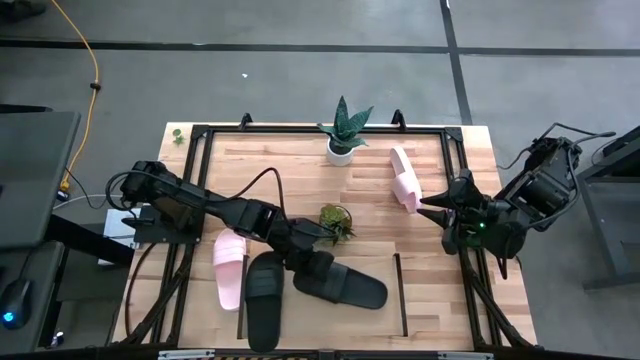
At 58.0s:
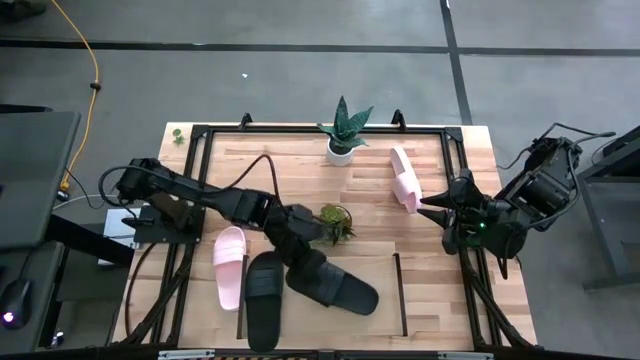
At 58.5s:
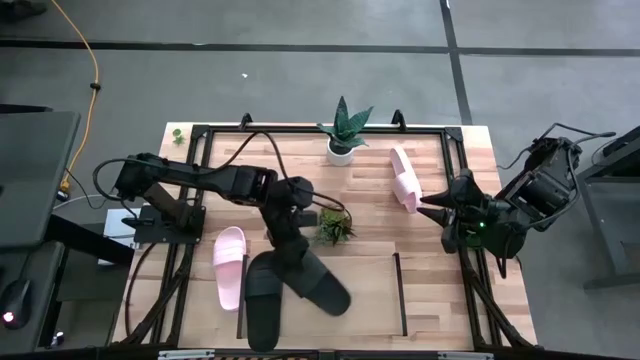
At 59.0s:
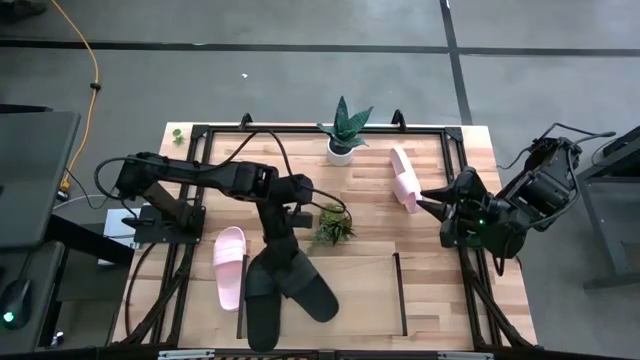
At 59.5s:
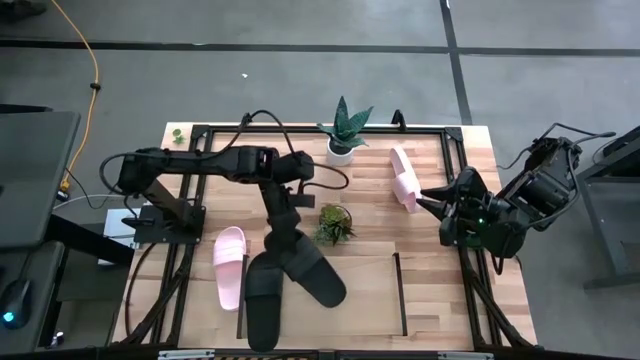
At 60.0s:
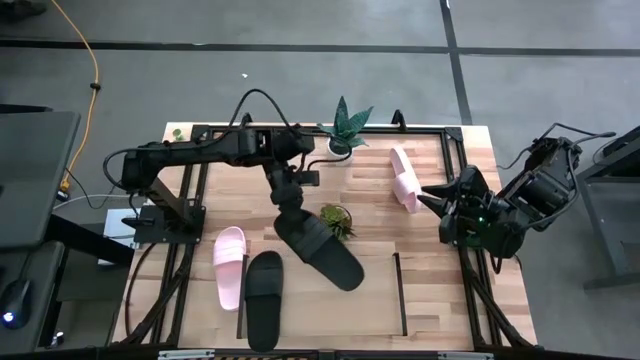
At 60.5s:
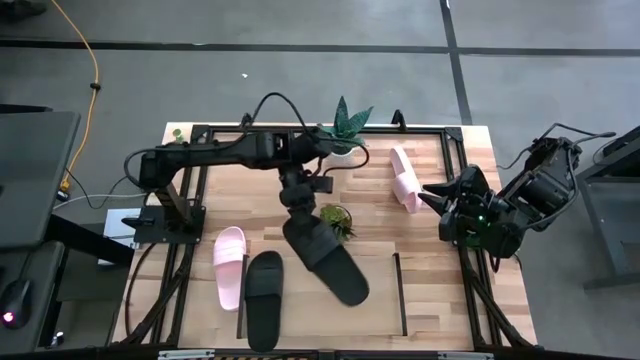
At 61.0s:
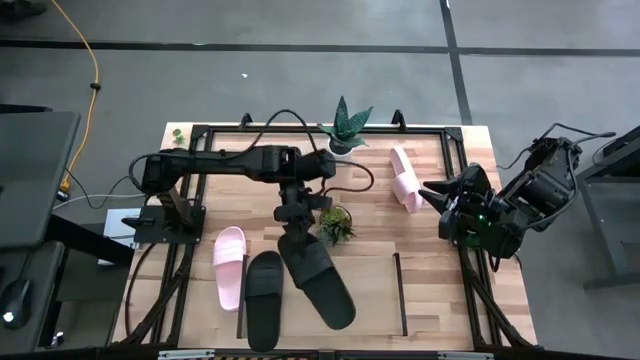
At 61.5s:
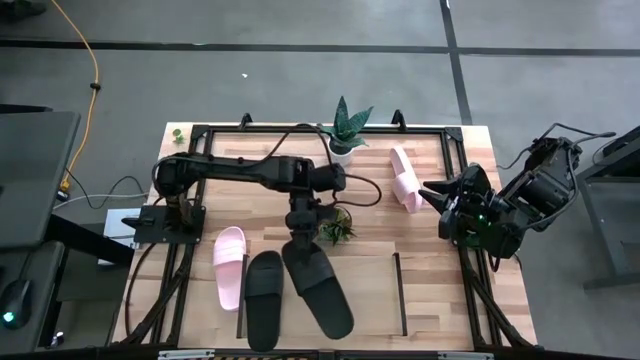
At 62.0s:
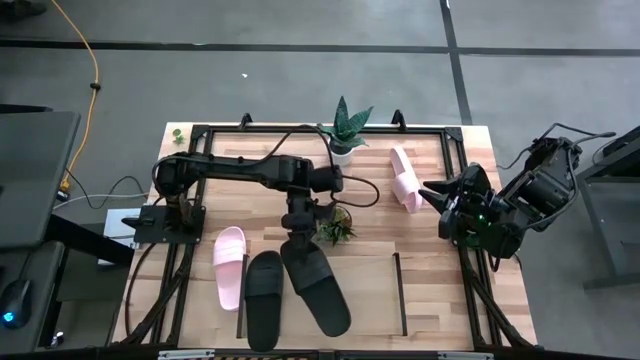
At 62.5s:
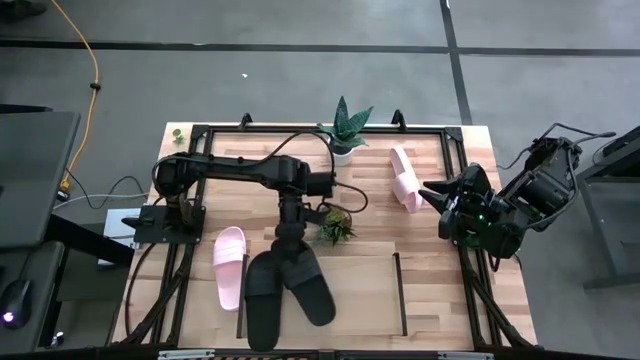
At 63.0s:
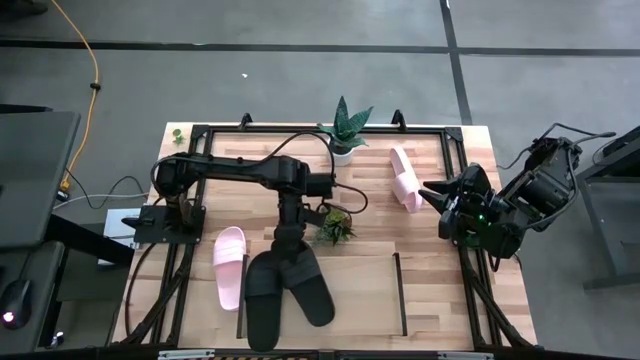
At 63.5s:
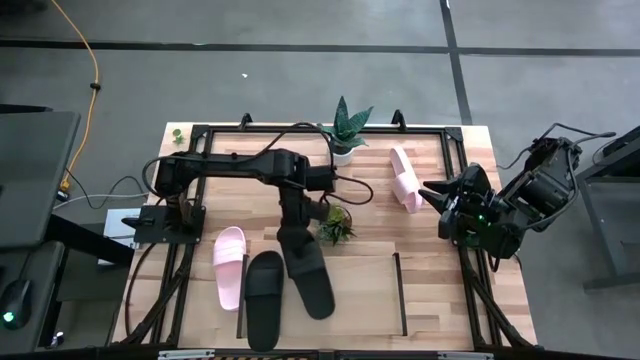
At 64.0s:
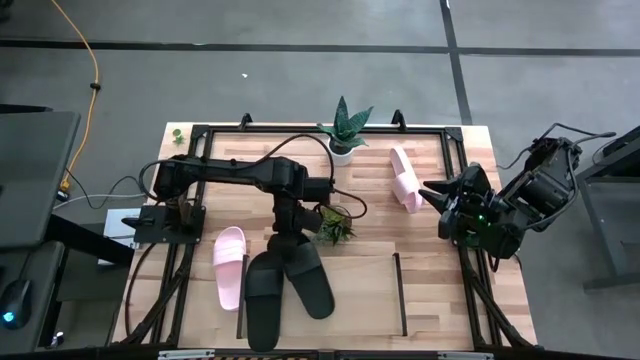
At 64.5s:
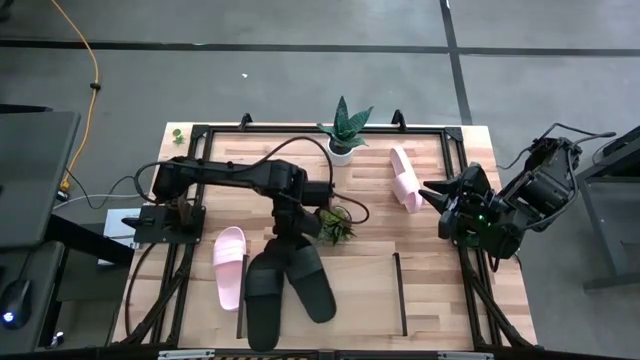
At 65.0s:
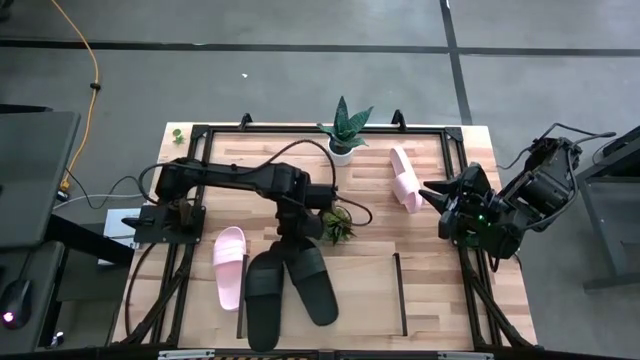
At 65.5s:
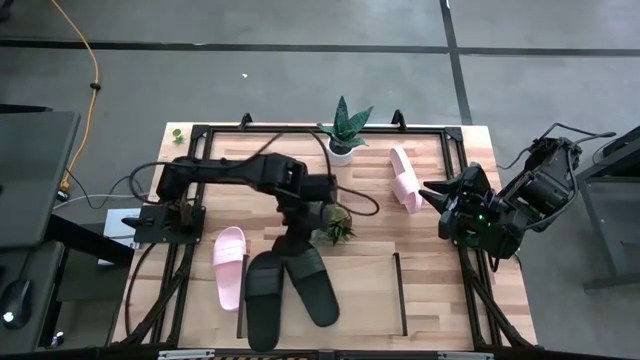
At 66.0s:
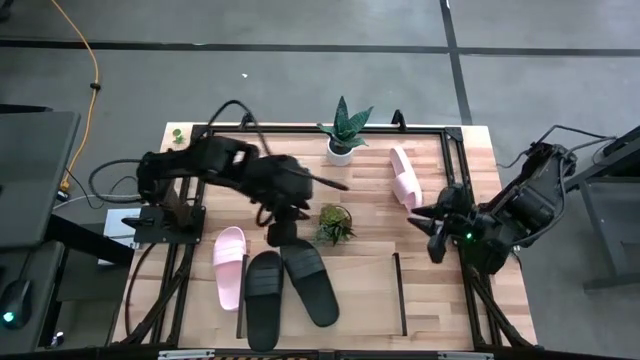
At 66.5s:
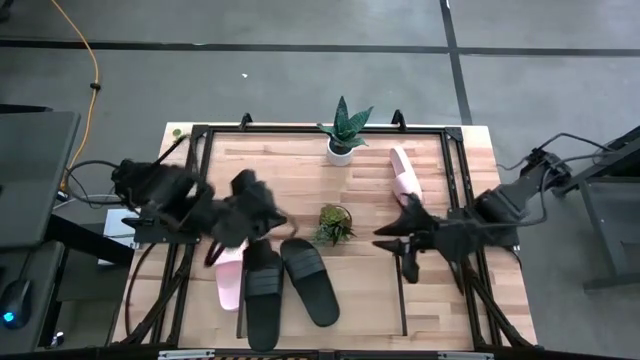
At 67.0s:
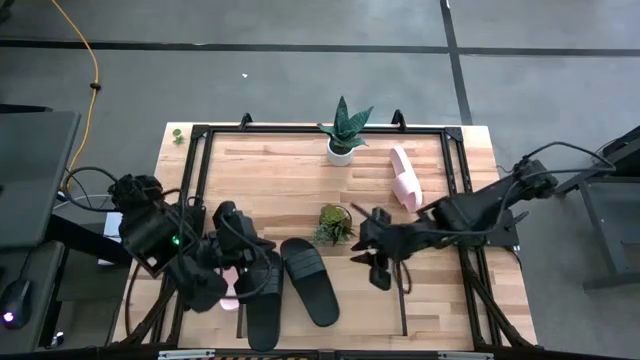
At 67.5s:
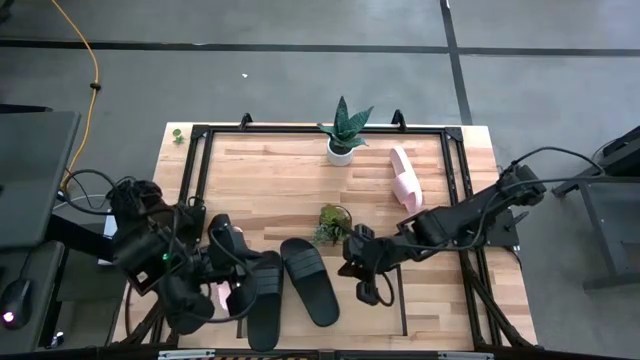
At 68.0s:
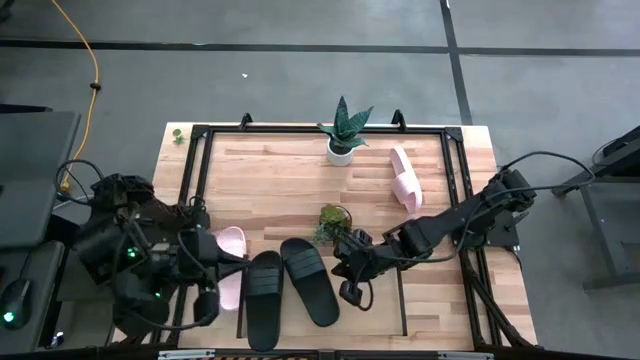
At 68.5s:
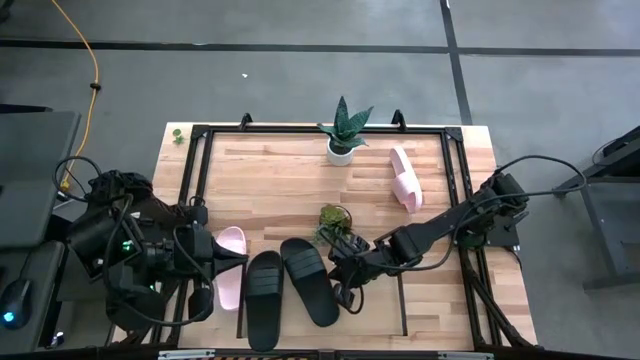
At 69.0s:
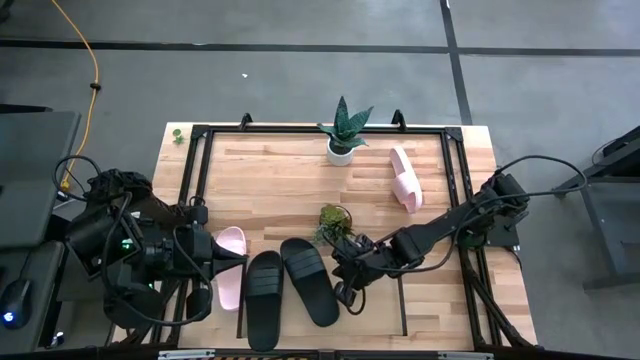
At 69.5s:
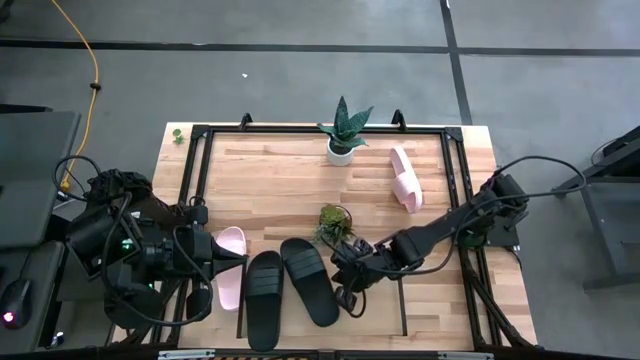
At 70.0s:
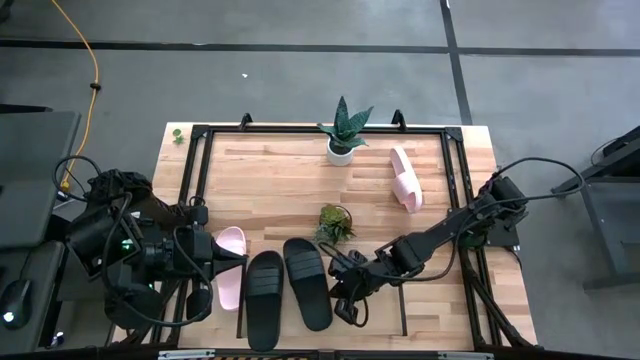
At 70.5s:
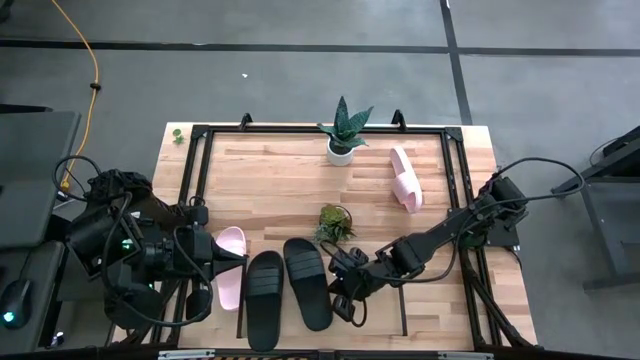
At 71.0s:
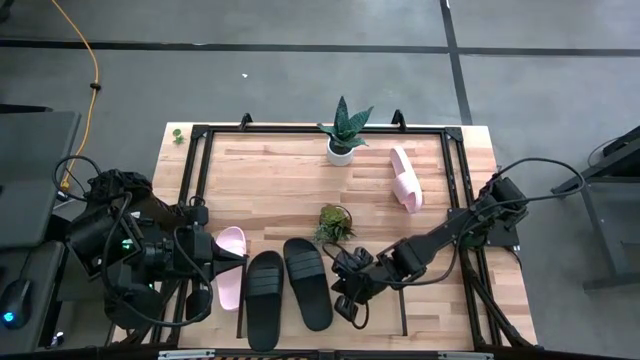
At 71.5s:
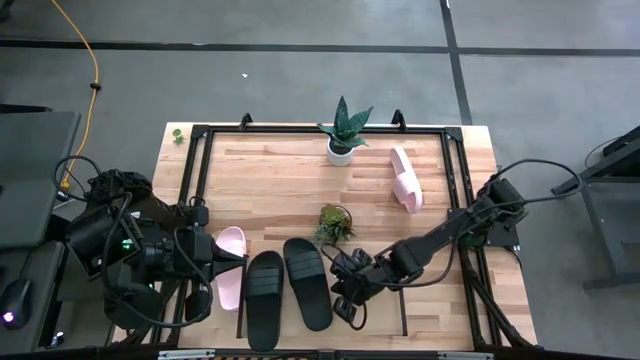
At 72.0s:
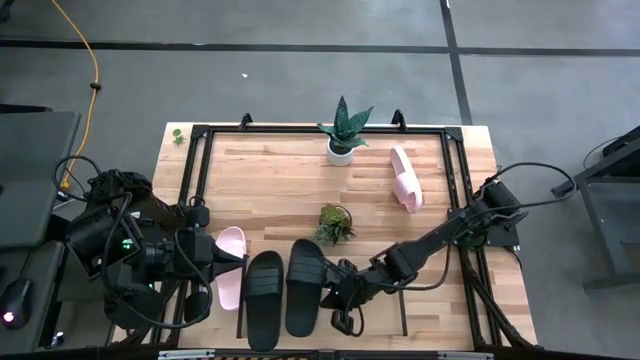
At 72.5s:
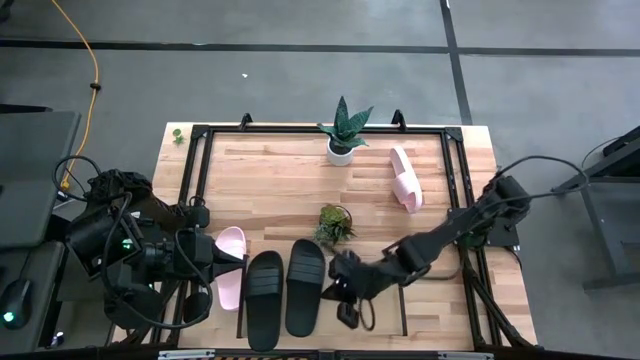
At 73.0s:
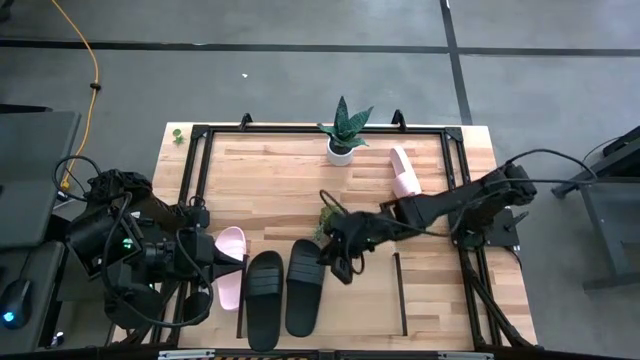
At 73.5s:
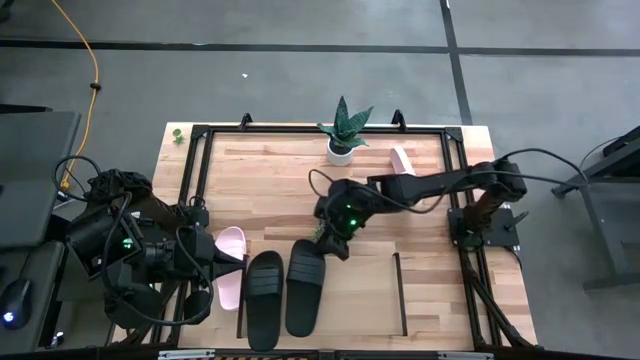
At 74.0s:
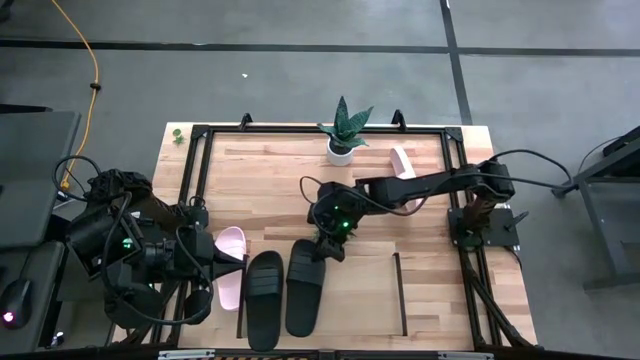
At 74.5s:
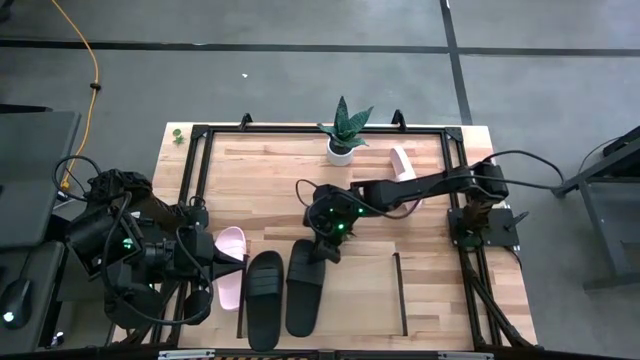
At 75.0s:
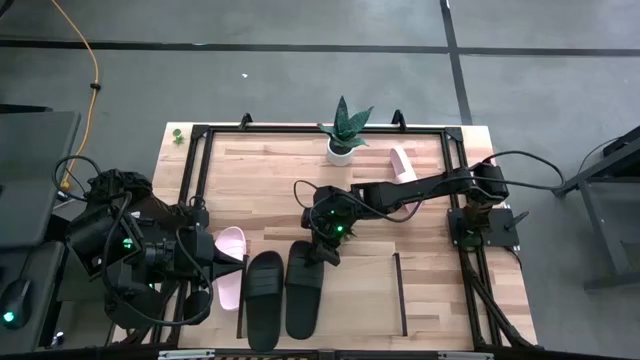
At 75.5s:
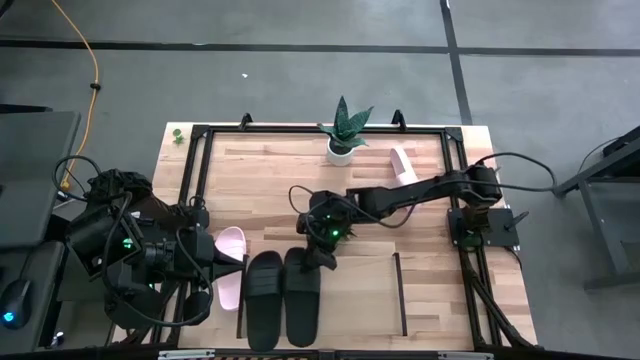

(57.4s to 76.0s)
Task: Pick and place slides into the shelf
Put the black slide on the shelf
